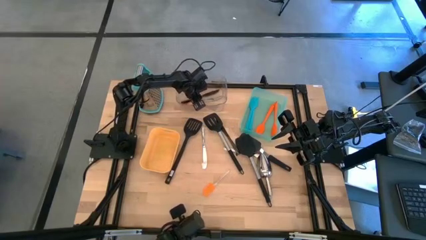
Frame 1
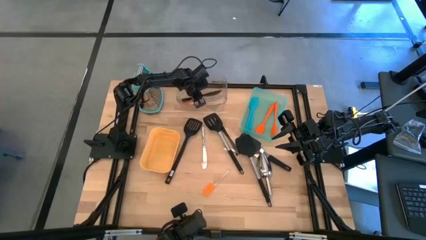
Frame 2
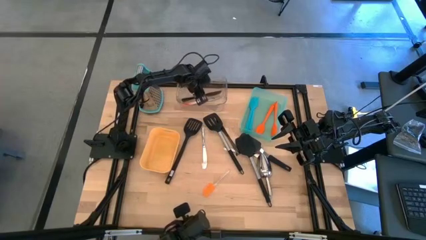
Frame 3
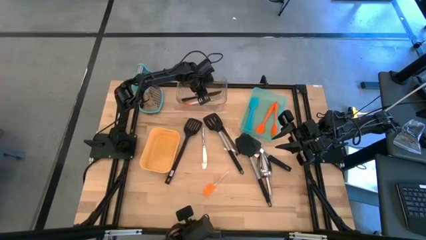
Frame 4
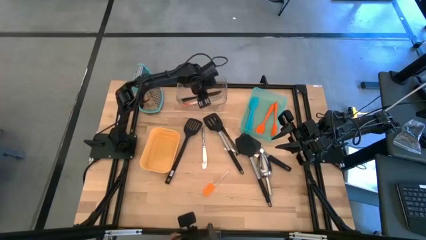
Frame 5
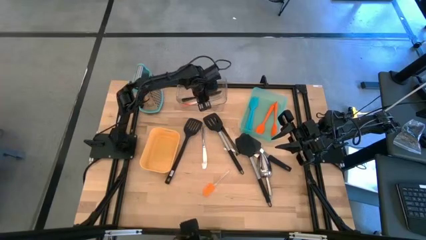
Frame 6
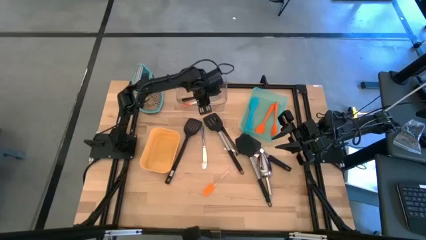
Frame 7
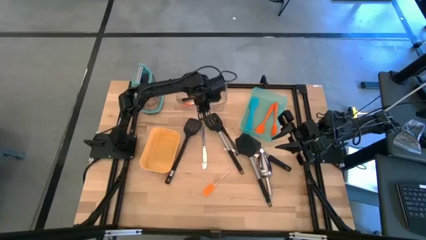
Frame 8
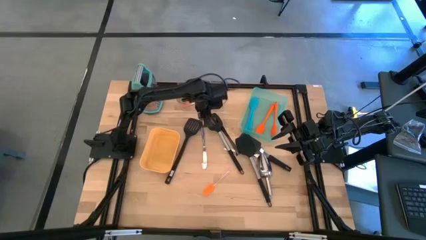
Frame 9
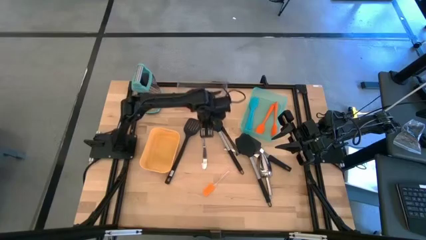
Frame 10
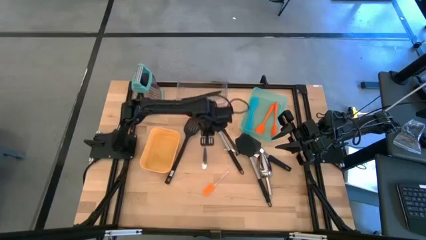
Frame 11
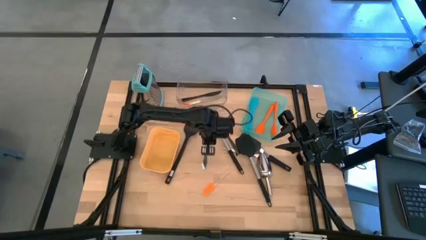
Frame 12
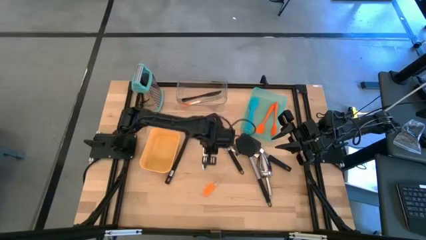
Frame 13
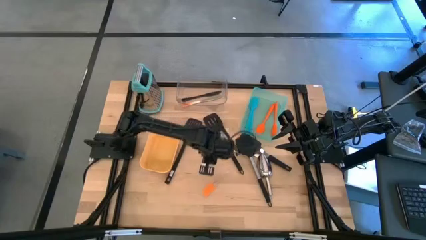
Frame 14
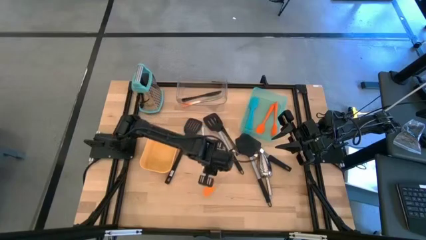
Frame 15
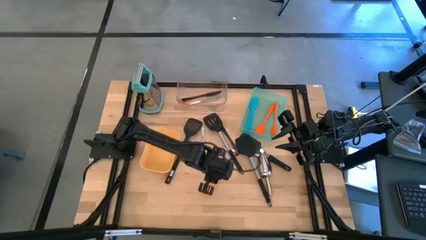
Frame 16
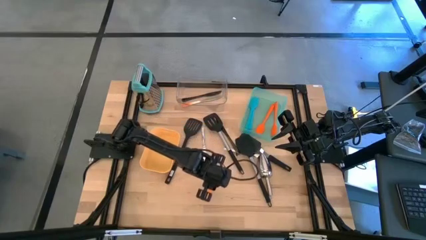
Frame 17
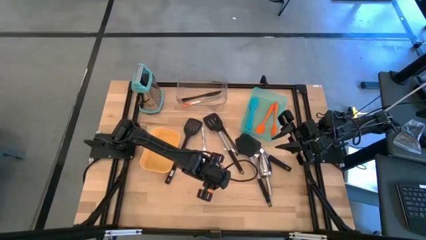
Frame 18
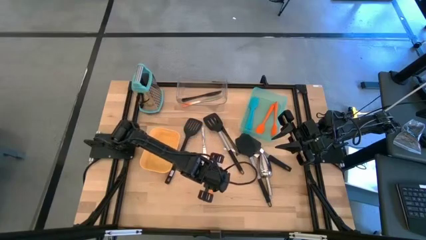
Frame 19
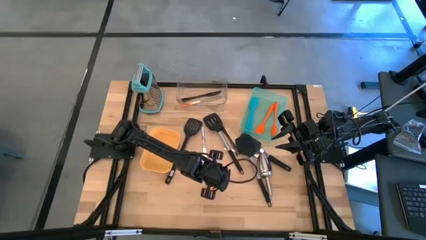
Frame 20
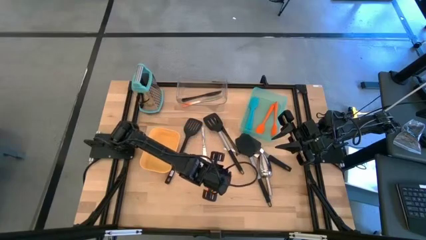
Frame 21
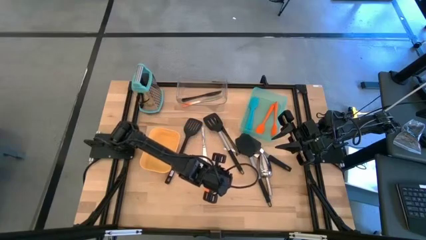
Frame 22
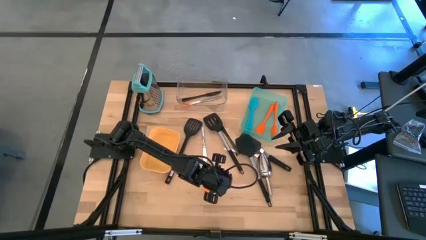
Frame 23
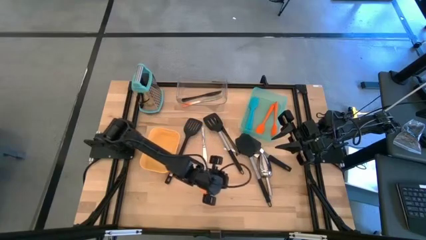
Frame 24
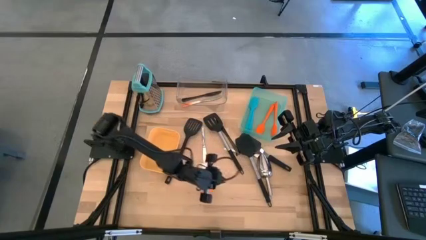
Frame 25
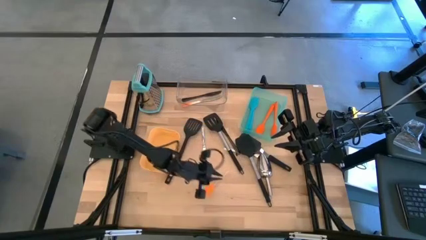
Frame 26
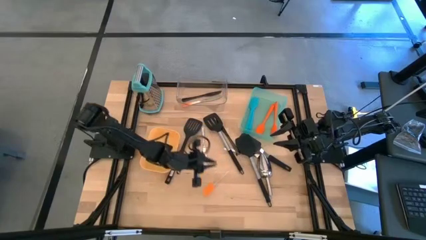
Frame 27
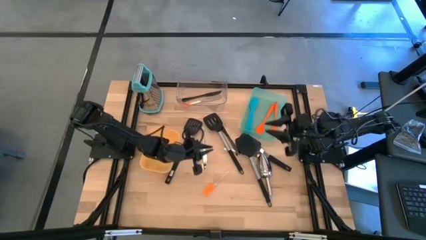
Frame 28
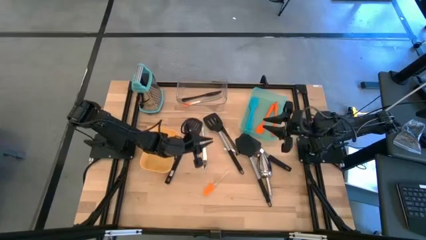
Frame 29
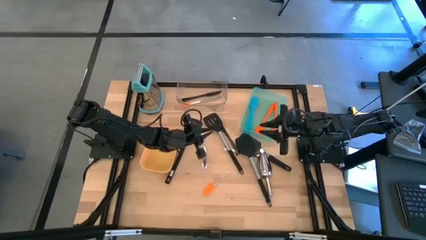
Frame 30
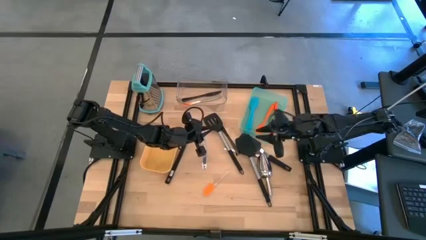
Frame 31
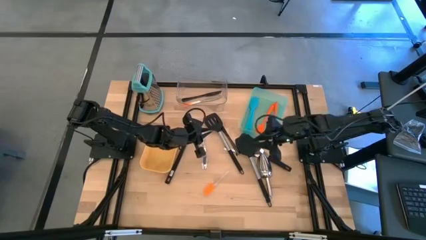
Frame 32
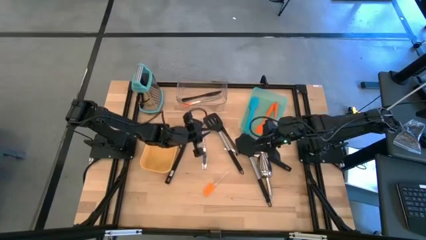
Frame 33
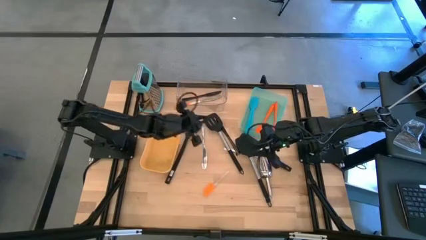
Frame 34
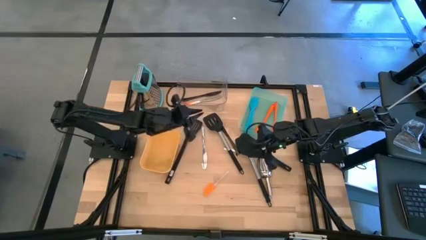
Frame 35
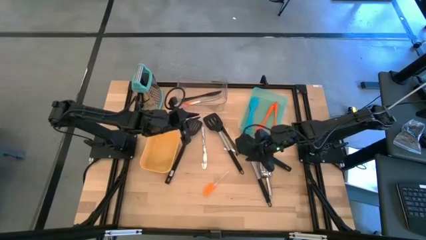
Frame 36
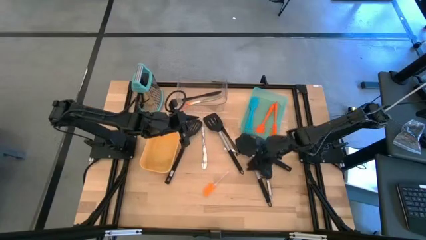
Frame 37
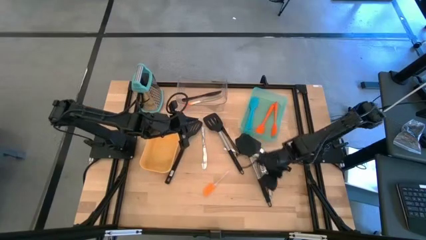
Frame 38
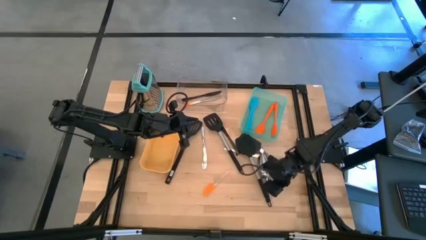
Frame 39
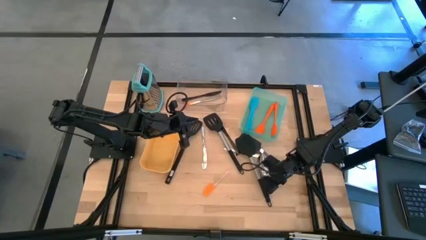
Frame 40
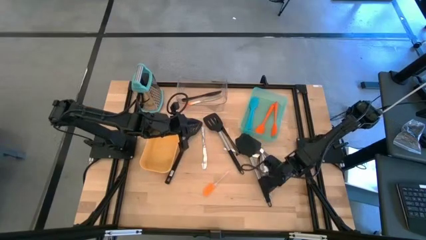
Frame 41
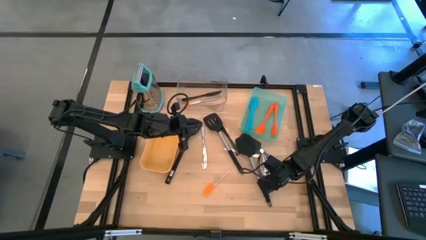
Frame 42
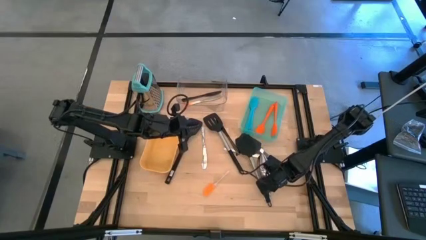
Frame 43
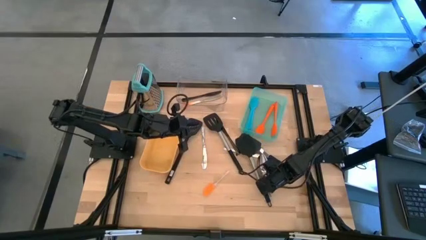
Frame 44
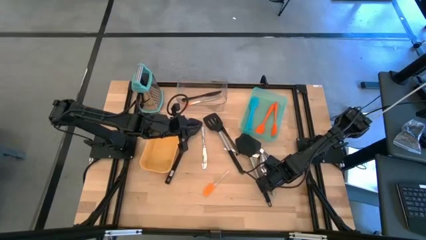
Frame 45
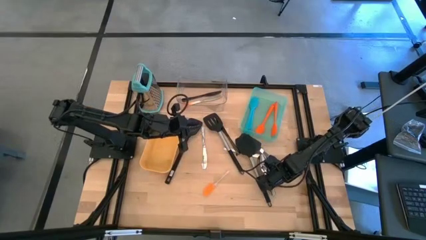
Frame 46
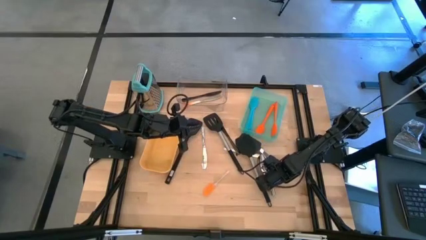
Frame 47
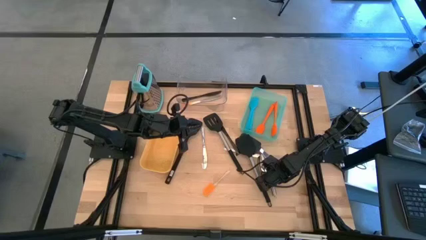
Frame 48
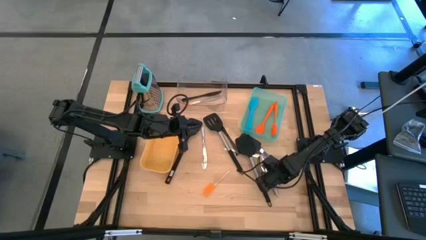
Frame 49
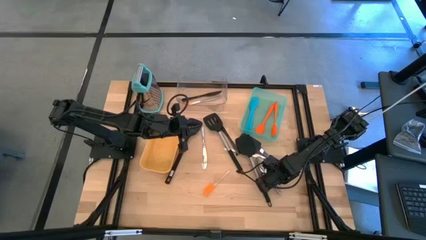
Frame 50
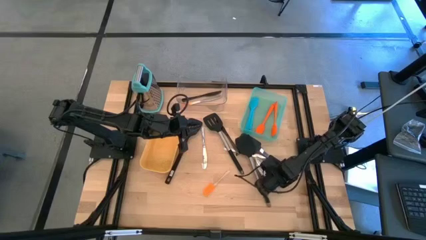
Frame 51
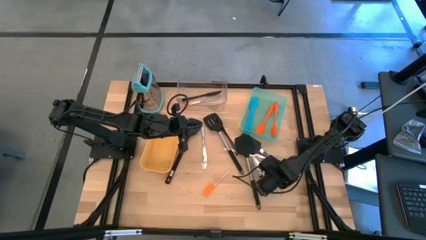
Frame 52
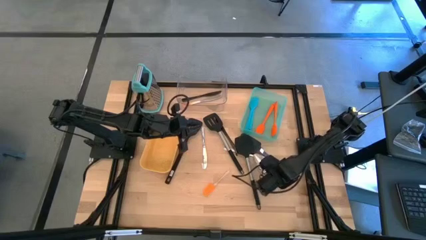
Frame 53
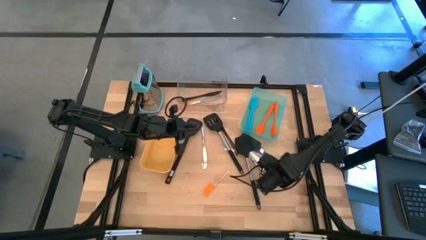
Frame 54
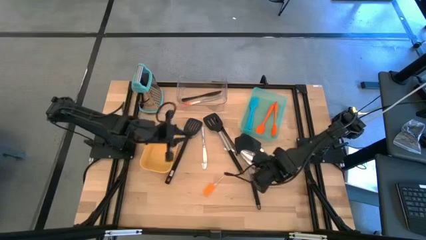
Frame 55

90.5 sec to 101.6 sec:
Task: Pick & Place Kitchen Items
Put the ice scoop into the yellow bin

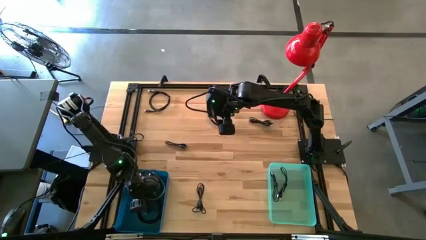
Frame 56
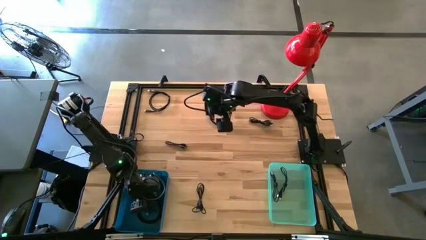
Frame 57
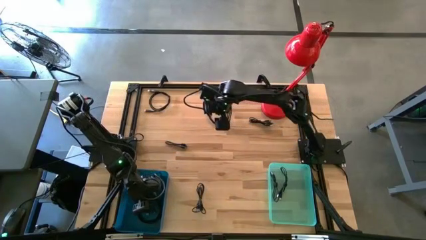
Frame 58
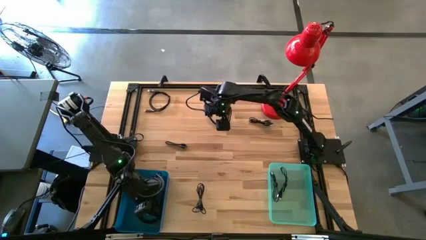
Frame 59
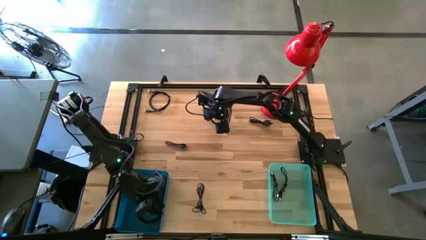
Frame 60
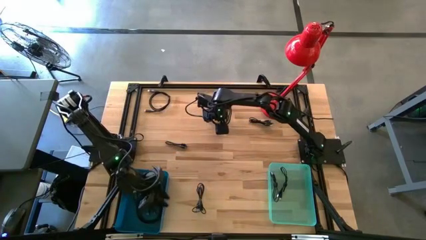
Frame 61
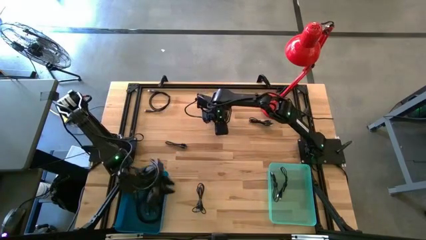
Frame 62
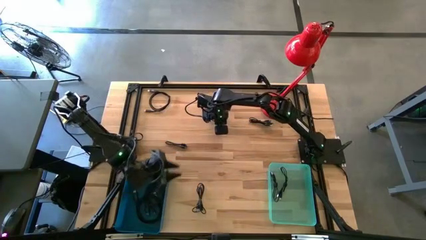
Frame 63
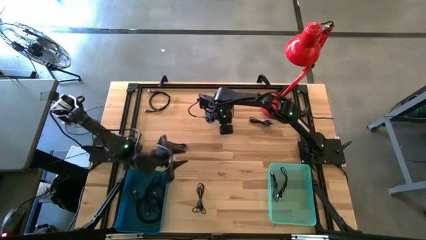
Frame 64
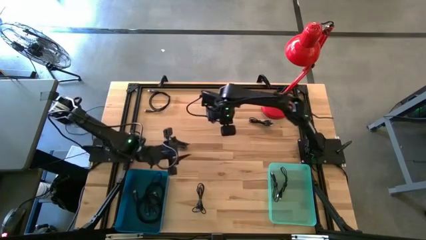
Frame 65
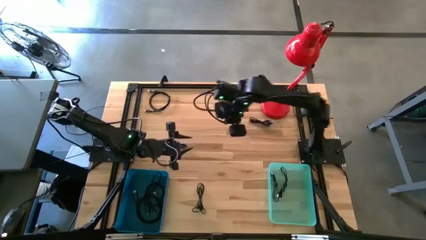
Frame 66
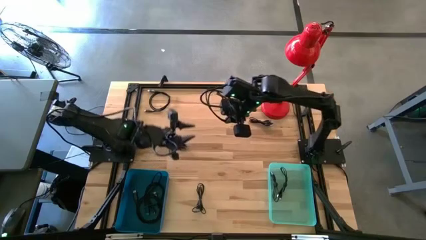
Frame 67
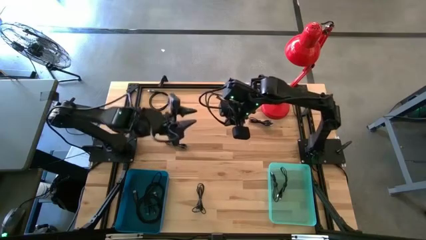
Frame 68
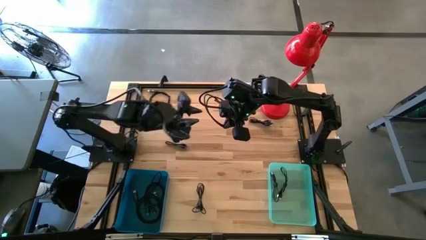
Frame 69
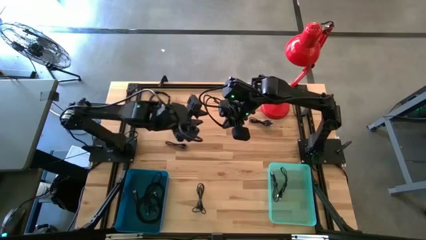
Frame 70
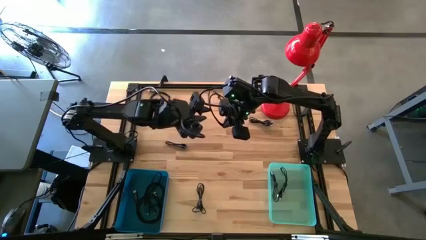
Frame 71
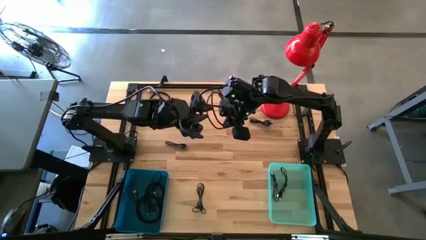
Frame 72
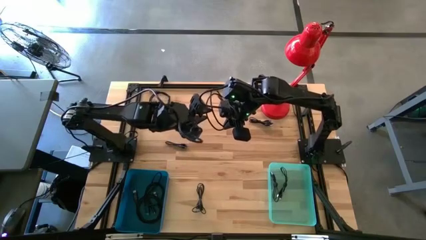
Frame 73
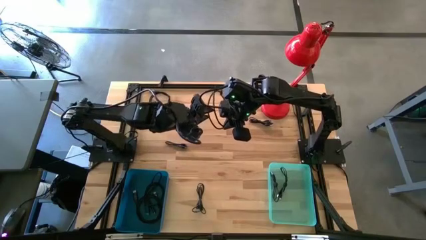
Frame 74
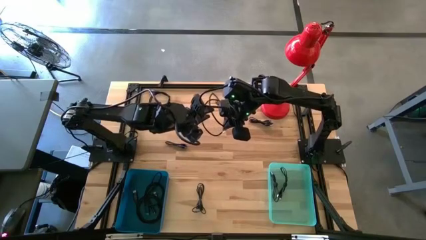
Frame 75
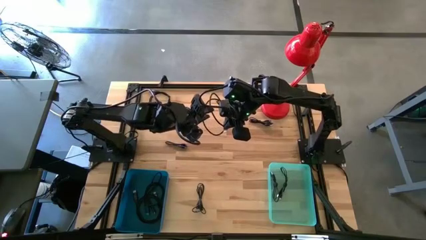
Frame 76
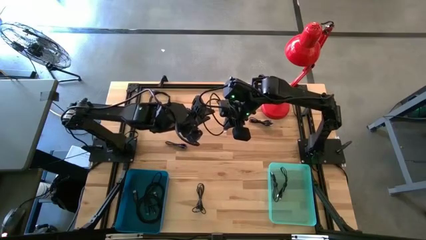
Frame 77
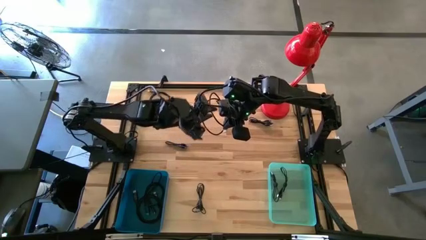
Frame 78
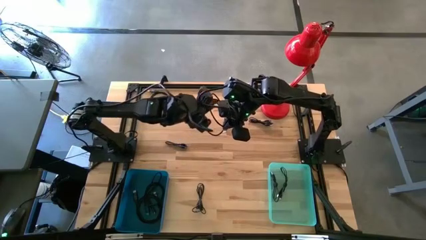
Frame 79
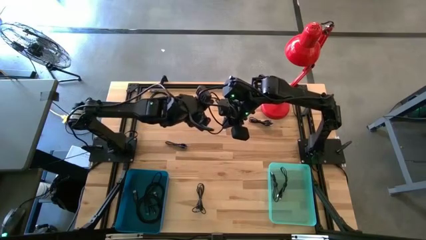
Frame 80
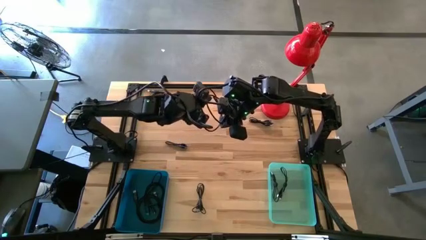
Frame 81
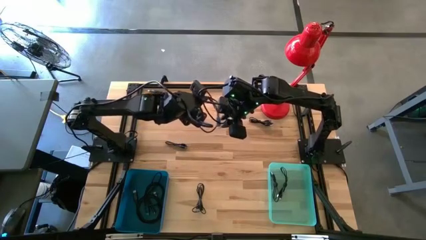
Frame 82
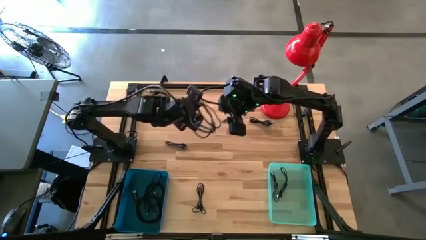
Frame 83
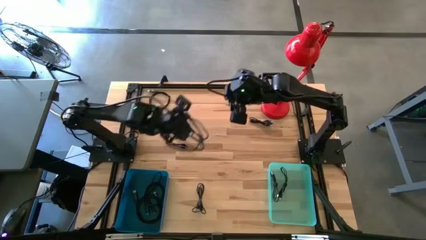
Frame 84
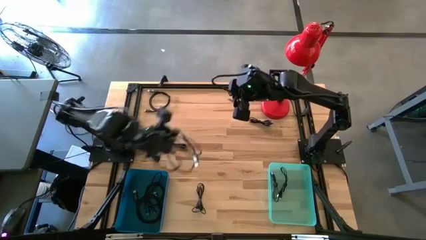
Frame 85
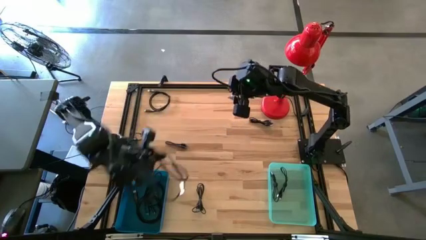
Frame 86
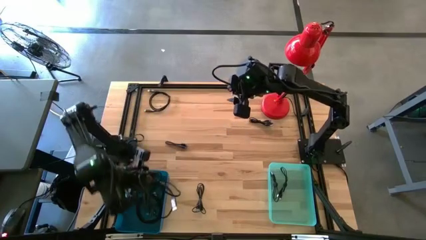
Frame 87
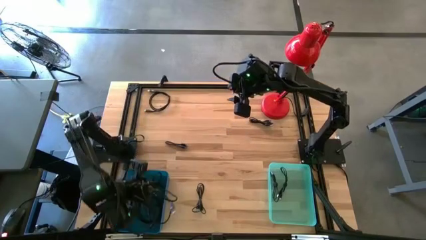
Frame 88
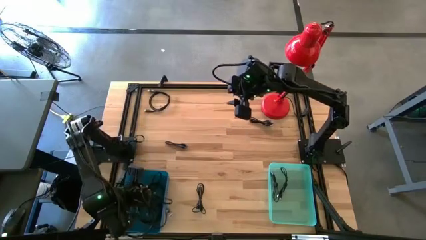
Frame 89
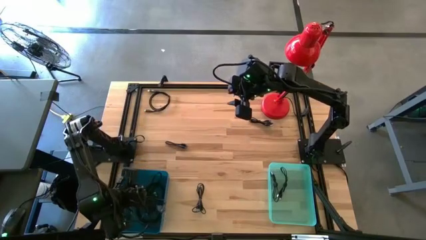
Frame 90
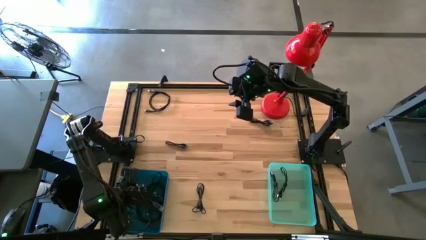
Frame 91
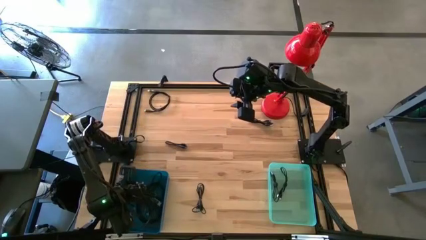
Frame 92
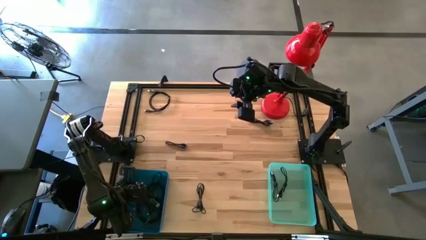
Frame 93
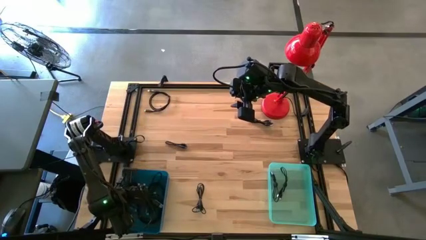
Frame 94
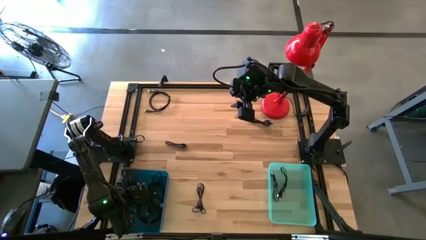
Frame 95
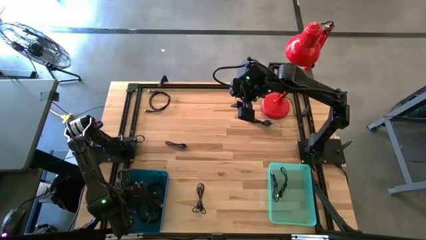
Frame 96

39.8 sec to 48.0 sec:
Task: Pick & Place USB Port
Put the black USB cable into the dark blue bin
